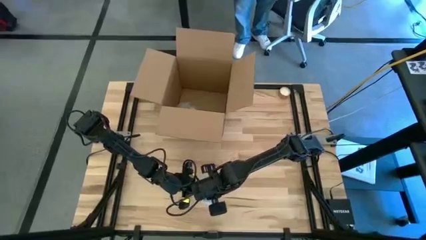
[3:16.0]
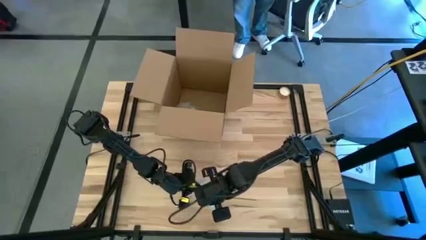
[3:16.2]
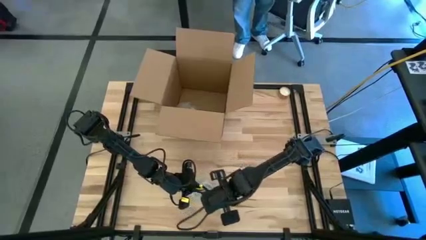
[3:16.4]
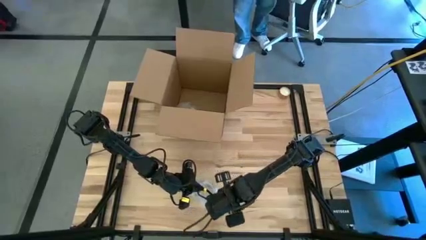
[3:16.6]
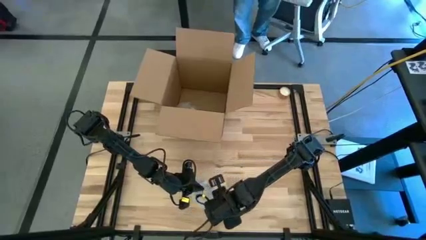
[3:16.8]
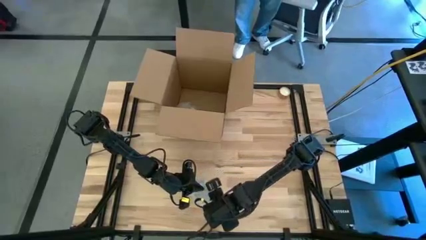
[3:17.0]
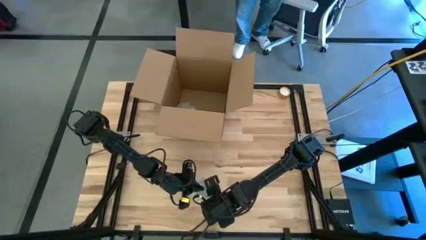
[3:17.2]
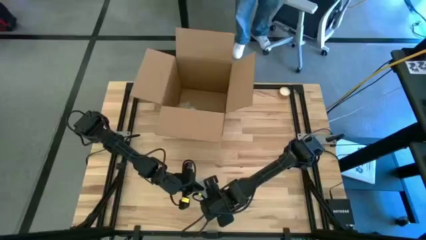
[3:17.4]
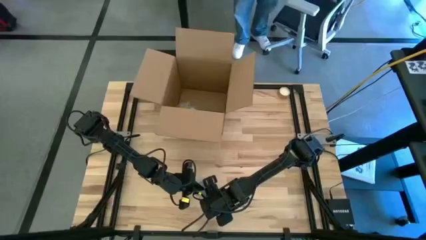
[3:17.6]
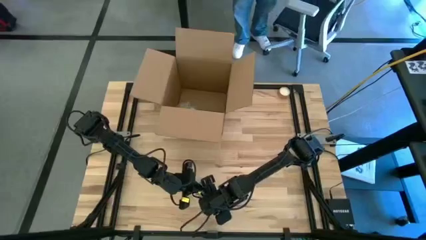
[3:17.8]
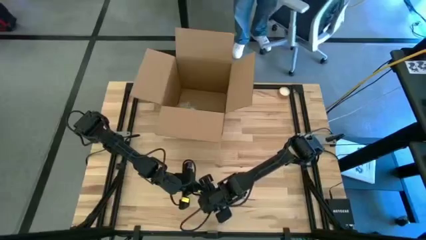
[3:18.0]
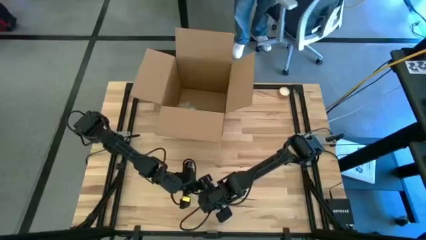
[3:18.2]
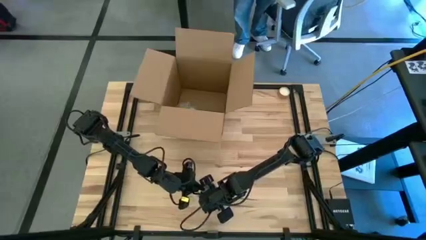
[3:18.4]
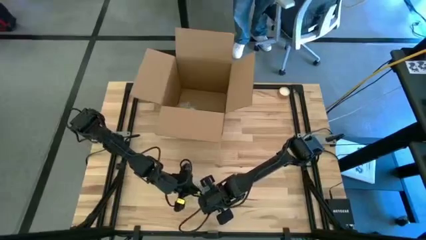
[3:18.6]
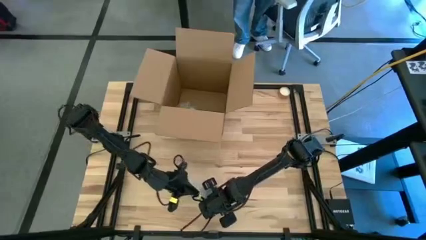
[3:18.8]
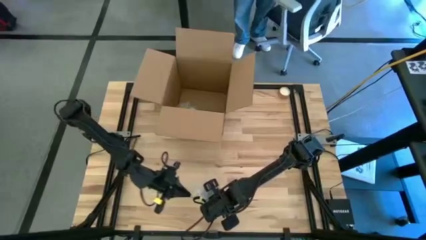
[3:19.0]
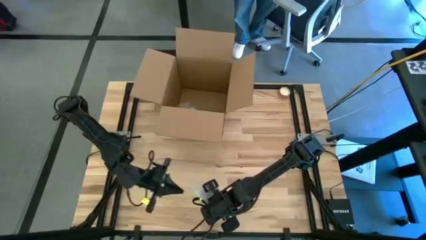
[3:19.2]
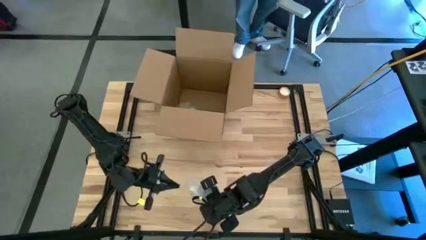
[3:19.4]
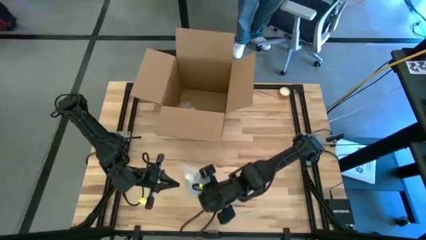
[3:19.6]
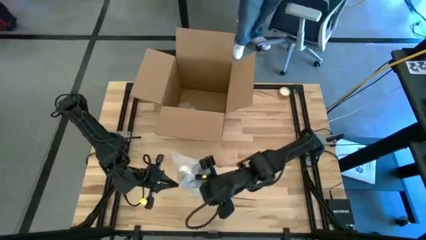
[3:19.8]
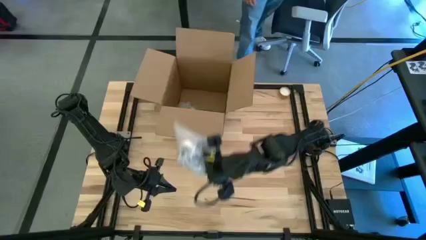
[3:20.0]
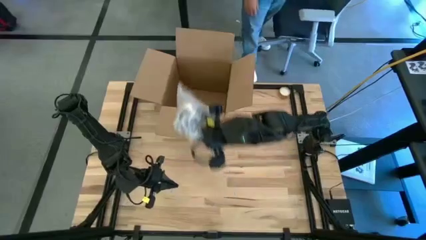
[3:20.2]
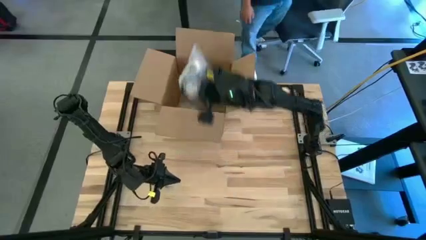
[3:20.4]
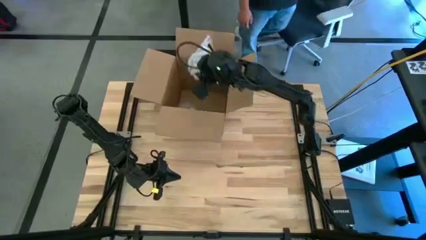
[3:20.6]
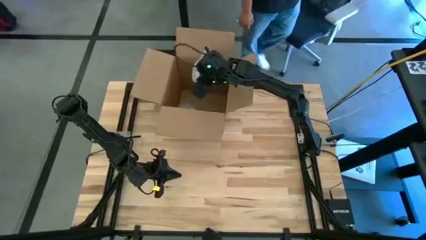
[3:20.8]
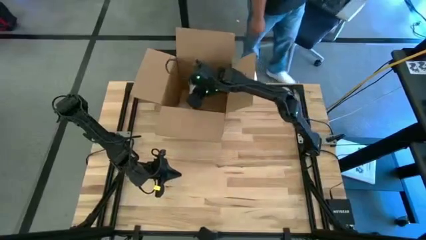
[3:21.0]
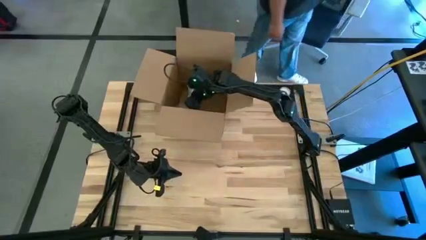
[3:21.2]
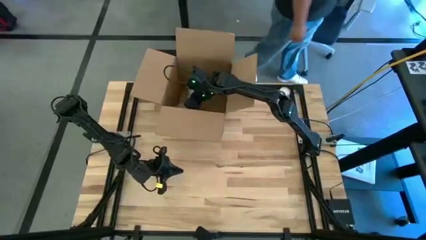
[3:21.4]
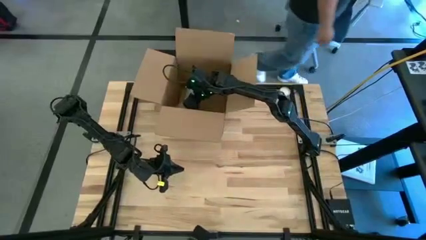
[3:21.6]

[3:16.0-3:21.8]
Task: wrap mug
Put the wrapped white mug into the box

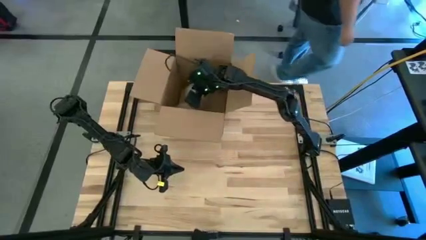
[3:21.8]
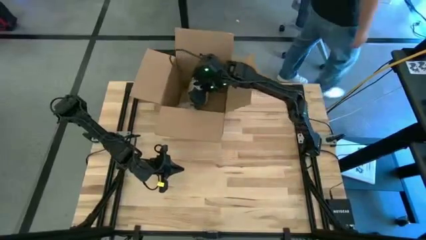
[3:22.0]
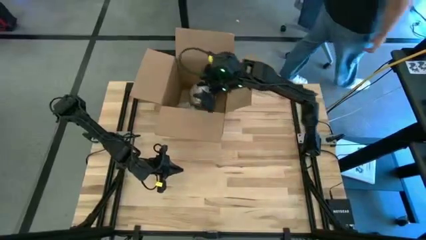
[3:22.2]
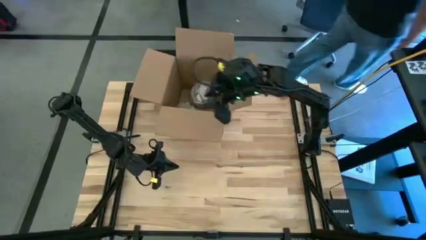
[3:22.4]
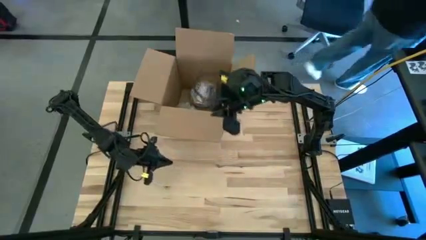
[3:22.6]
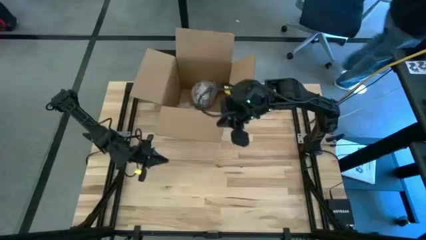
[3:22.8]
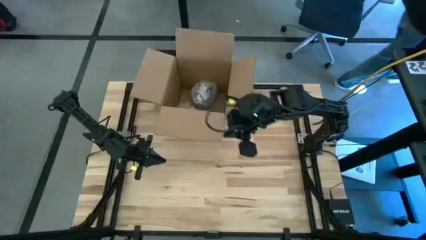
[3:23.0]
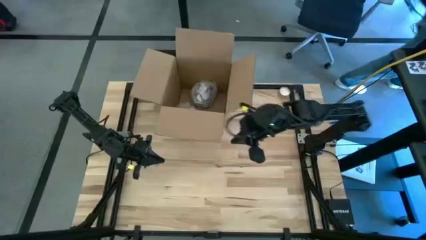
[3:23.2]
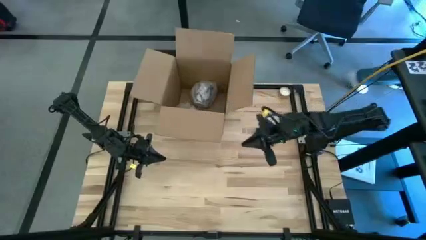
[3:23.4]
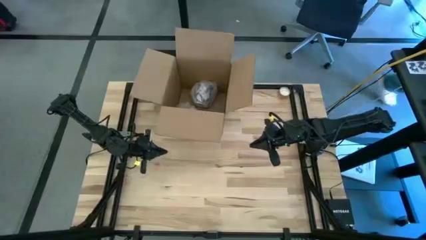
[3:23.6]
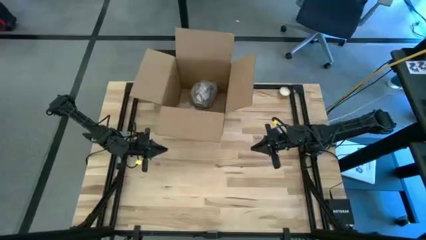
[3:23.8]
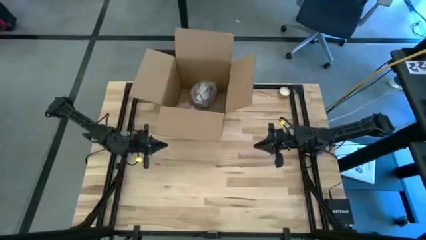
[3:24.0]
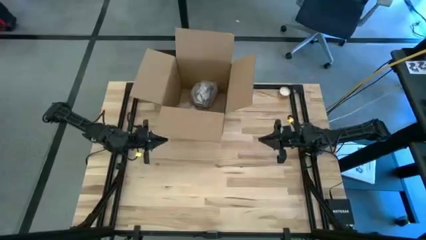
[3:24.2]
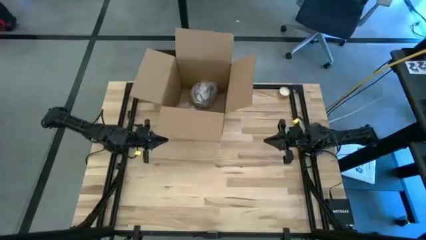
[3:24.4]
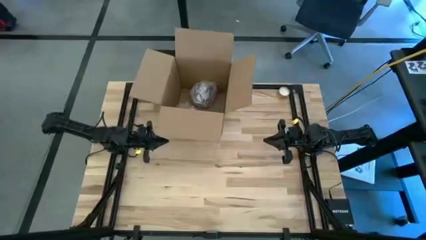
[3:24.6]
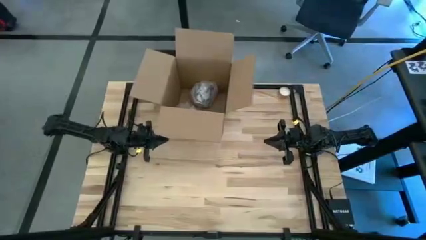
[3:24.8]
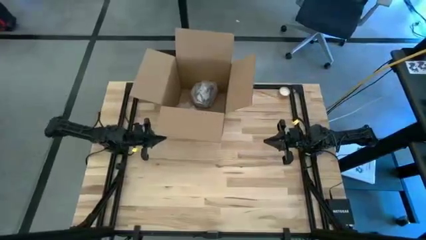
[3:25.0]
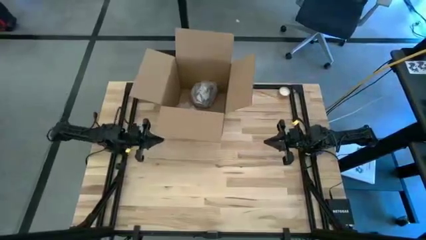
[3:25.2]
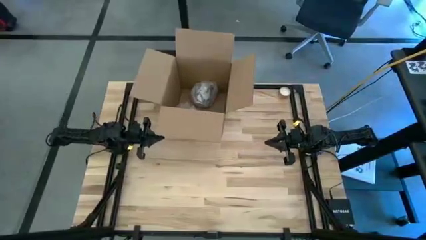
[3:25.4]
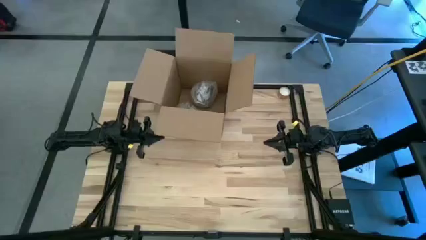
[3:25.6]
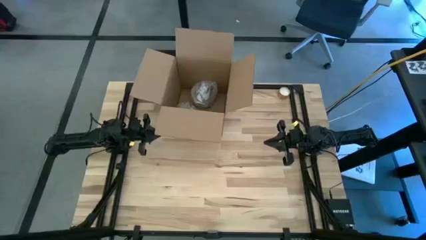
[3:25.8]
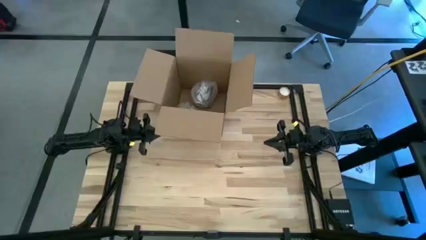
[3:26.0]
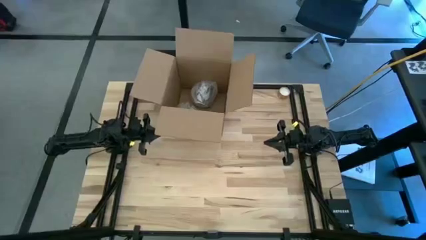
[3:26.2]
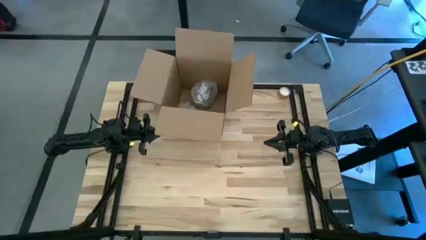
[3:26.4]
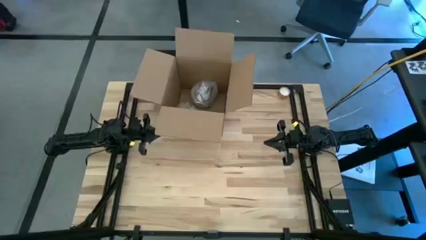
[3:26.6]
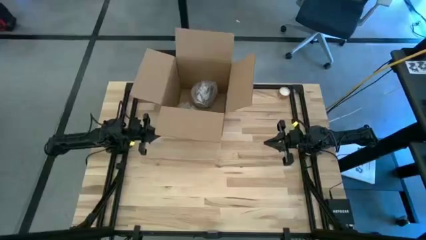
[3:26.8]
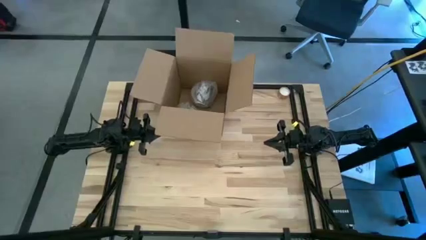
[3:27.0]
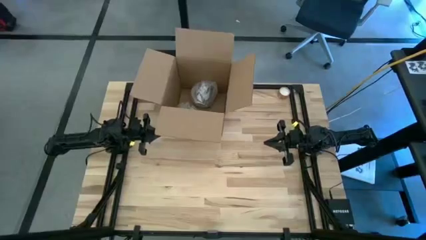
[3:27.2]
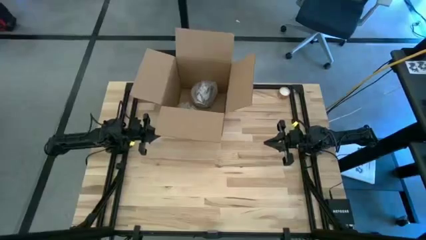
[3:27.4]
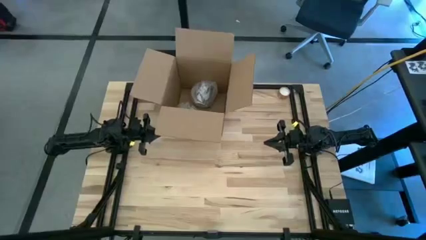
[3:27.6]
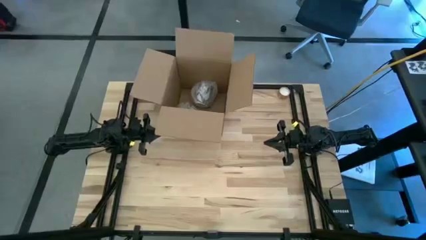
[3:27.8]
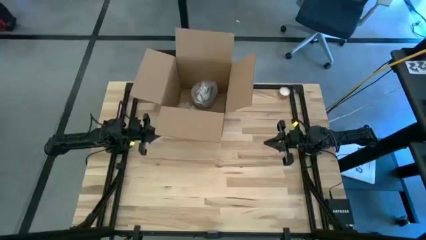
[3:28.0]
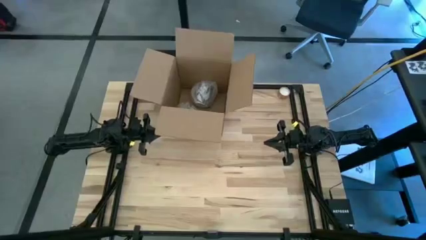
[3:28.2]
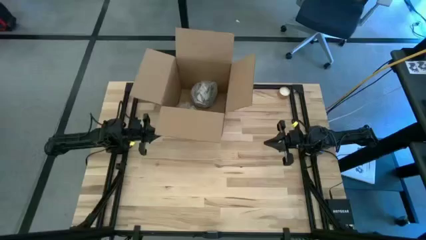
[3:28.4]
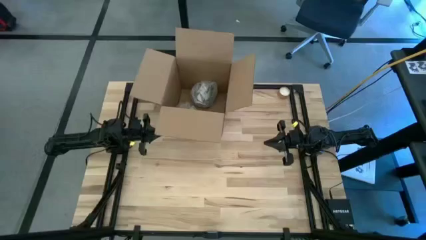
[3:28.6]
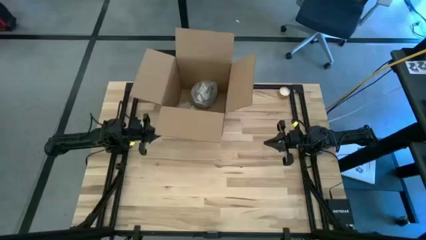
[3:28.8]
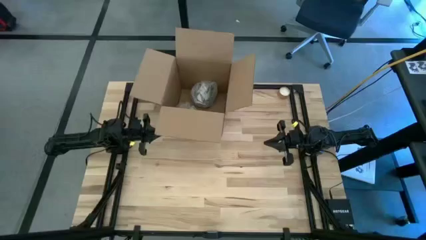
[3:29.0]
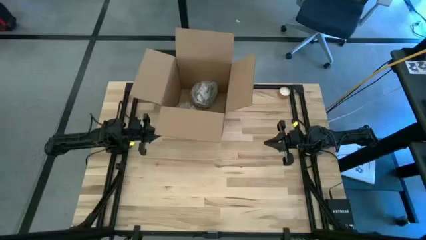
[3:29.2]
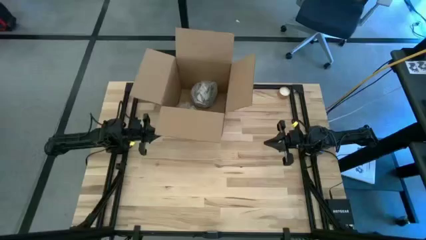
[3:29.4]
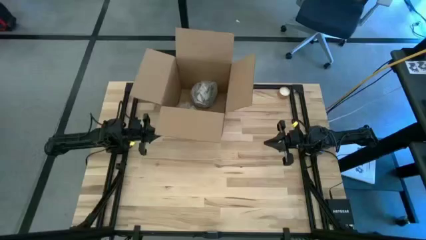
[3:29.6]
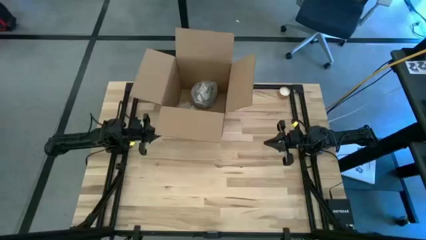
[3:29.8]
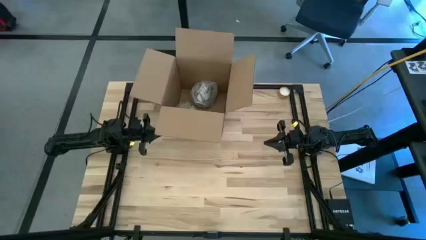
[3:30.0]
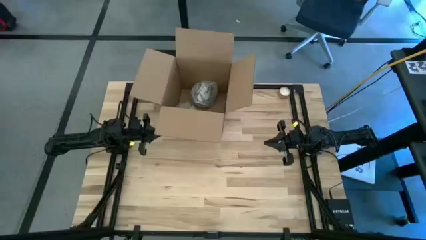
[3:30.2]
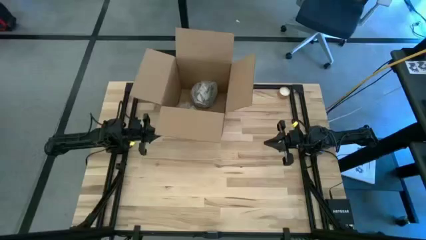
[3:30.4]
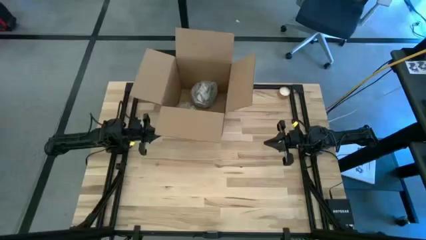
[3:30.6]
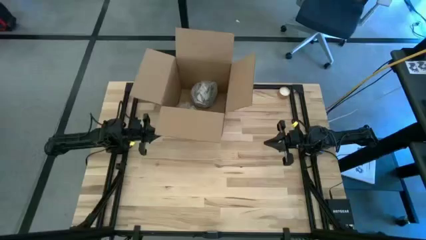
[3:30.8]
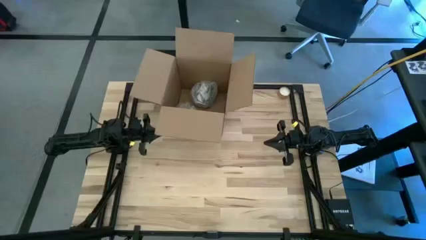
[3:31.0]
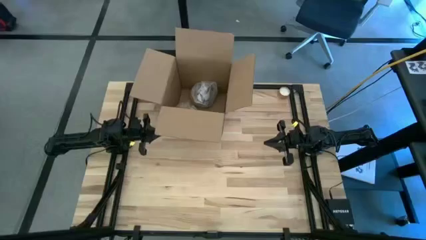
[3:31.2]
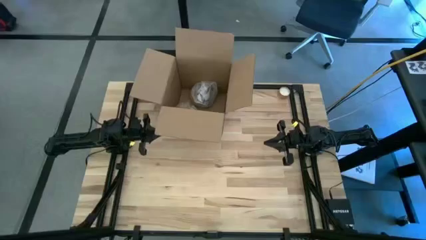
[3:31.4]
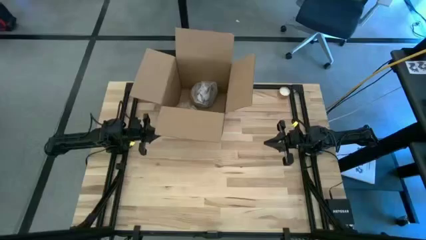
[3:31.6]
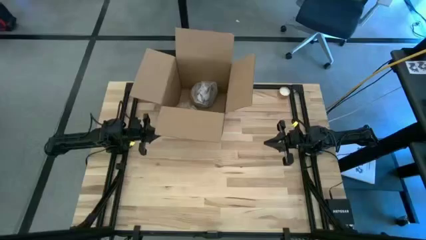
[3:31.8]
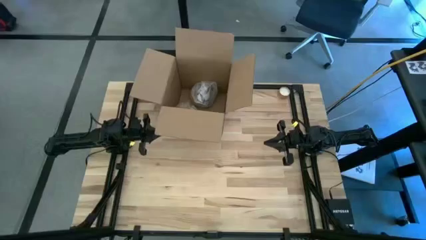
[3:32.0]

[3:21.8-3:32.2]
Return to Home Position
